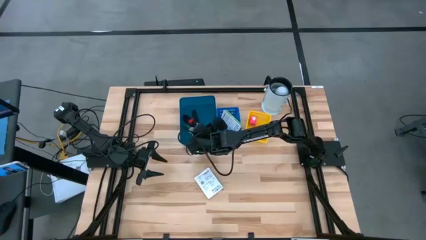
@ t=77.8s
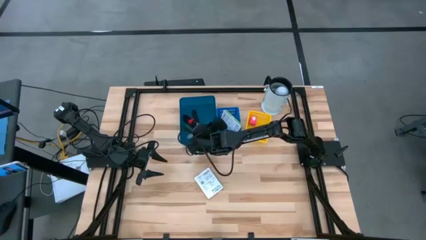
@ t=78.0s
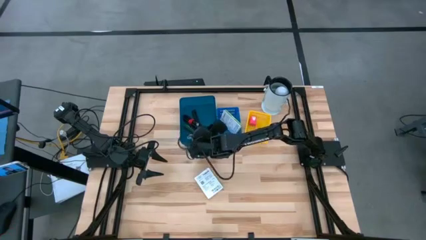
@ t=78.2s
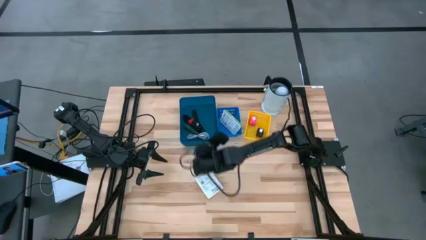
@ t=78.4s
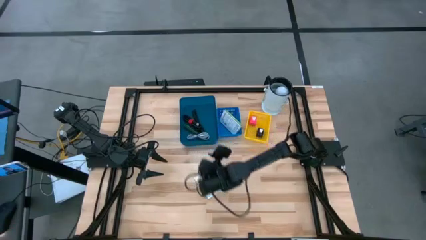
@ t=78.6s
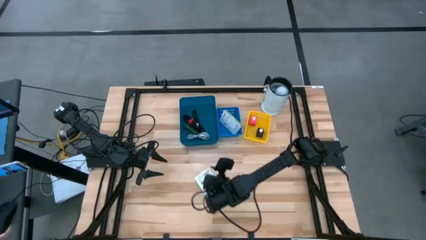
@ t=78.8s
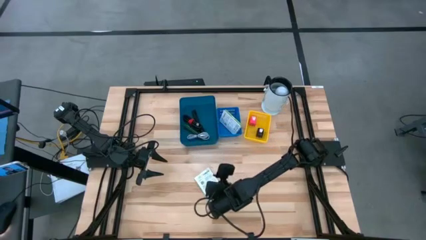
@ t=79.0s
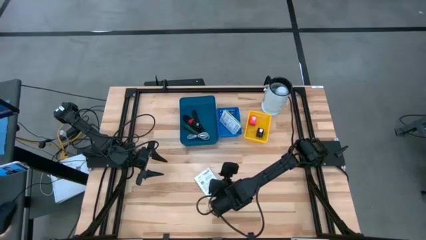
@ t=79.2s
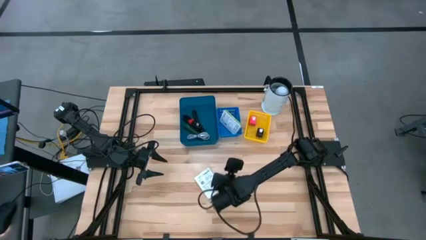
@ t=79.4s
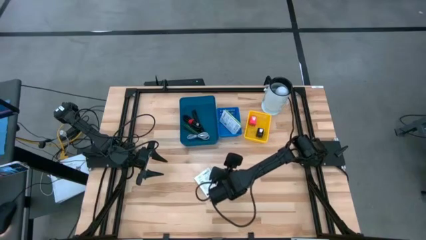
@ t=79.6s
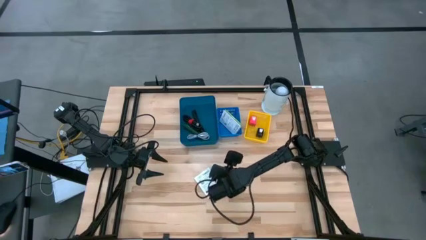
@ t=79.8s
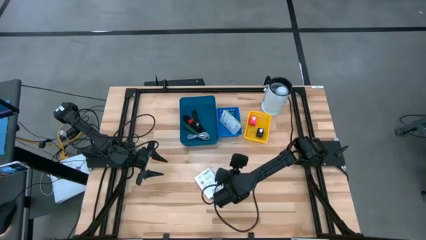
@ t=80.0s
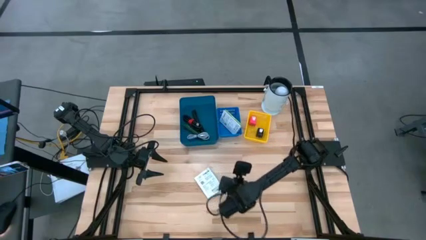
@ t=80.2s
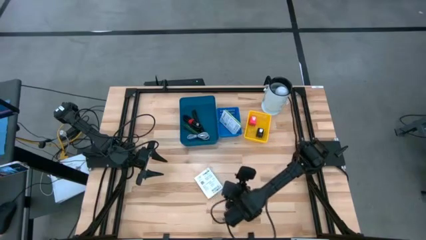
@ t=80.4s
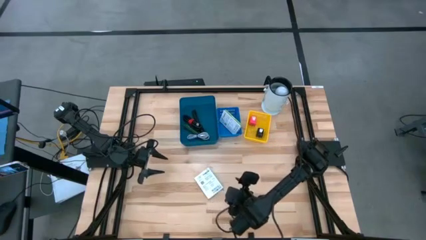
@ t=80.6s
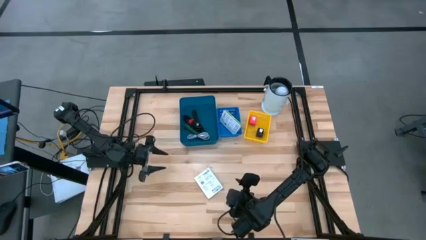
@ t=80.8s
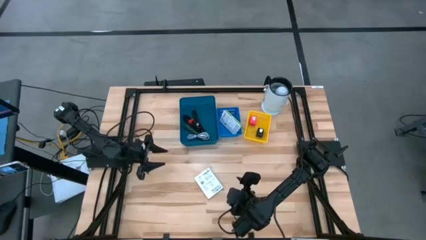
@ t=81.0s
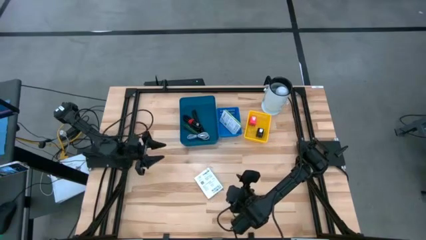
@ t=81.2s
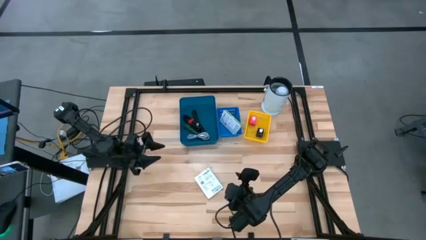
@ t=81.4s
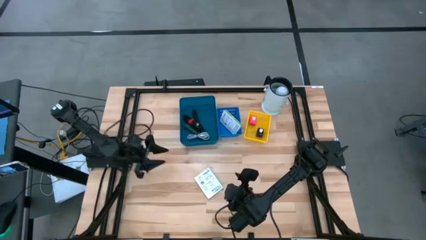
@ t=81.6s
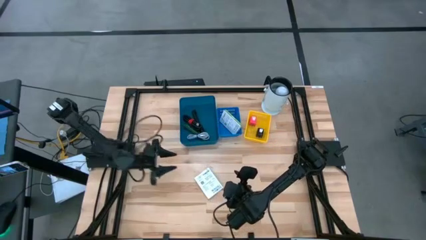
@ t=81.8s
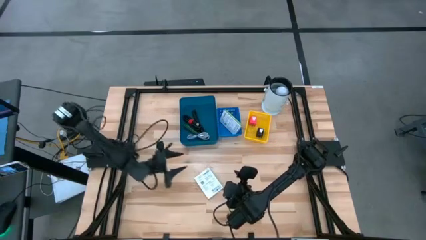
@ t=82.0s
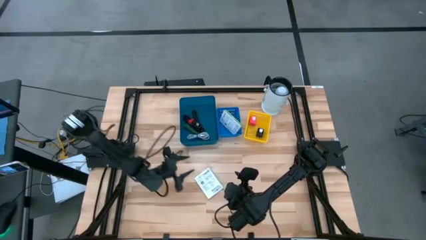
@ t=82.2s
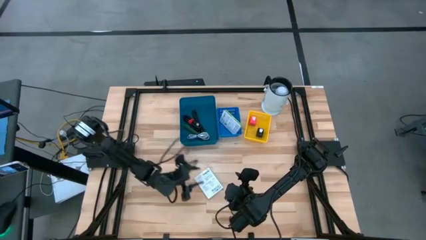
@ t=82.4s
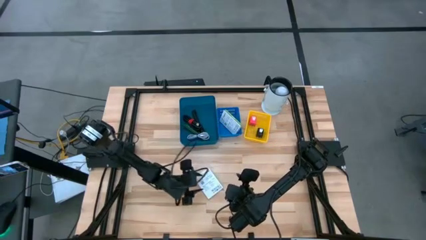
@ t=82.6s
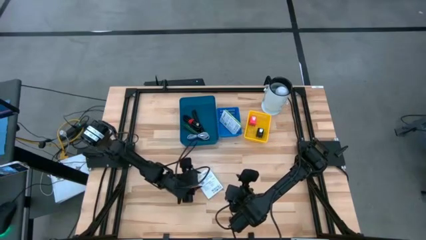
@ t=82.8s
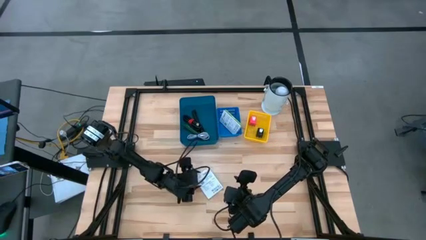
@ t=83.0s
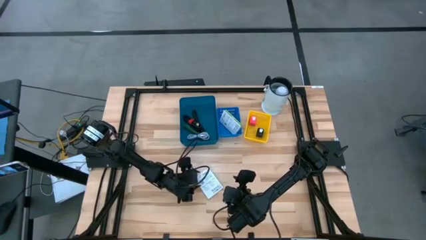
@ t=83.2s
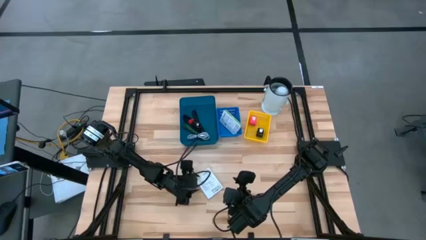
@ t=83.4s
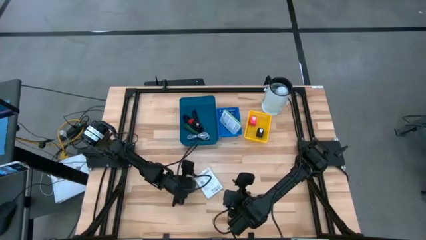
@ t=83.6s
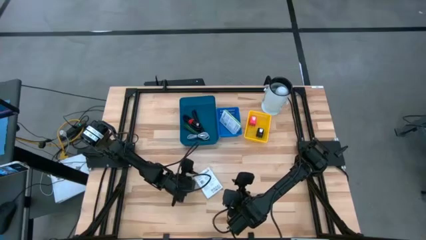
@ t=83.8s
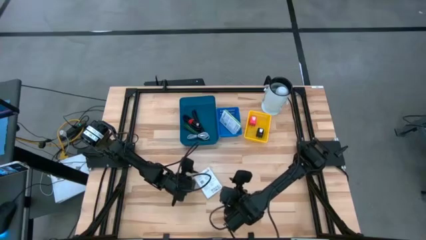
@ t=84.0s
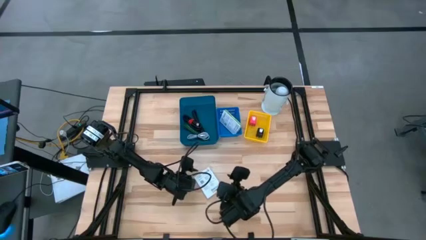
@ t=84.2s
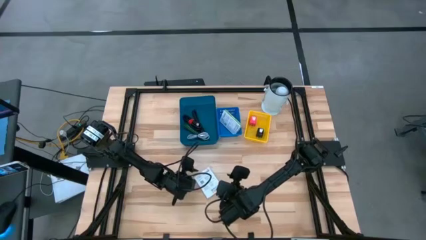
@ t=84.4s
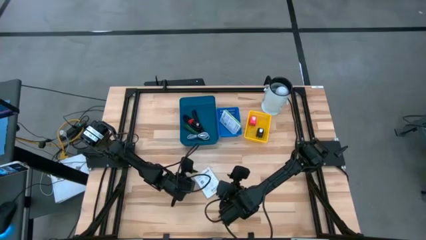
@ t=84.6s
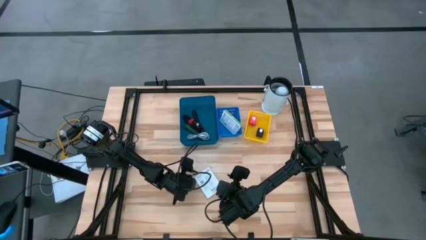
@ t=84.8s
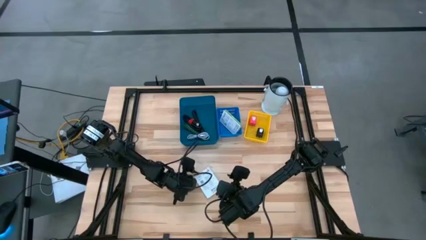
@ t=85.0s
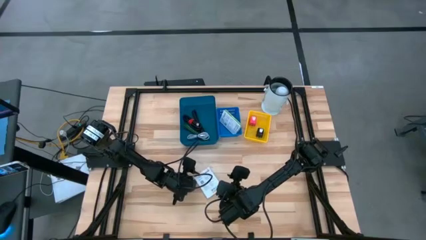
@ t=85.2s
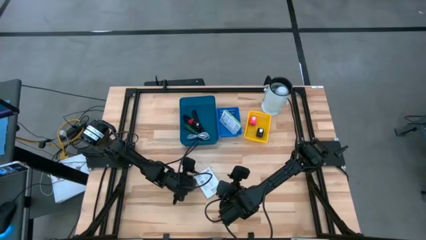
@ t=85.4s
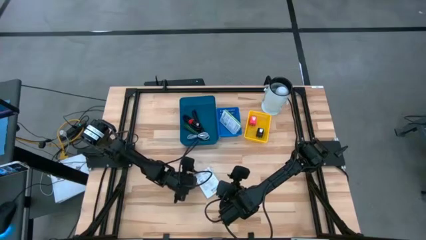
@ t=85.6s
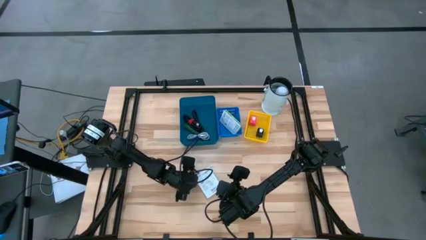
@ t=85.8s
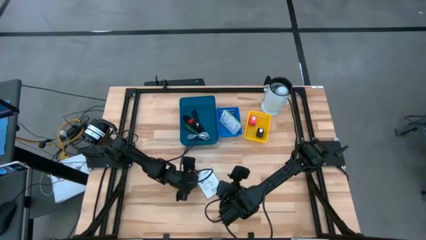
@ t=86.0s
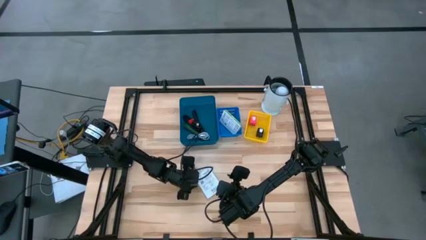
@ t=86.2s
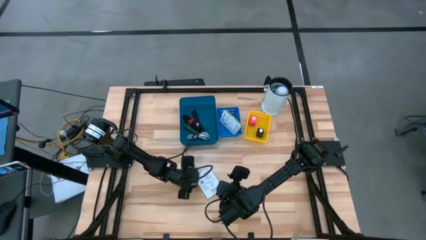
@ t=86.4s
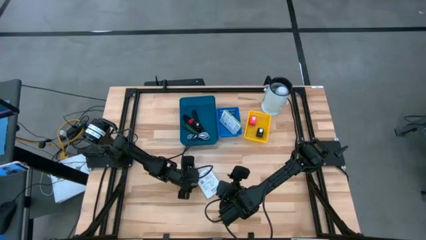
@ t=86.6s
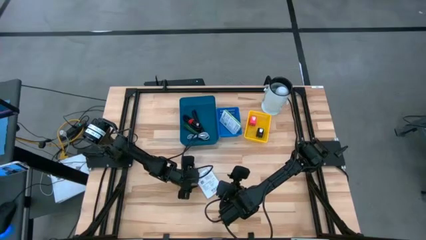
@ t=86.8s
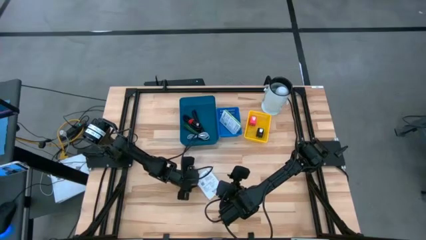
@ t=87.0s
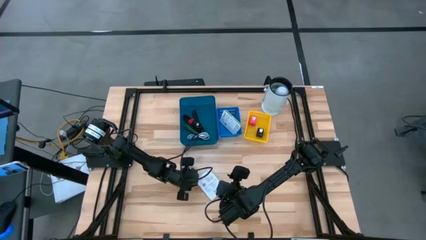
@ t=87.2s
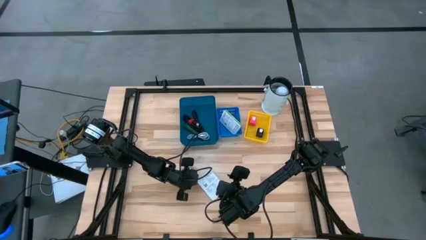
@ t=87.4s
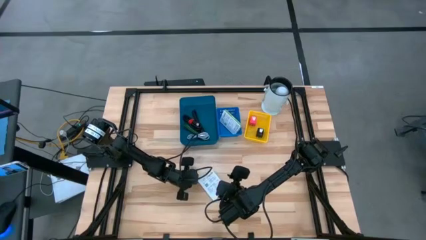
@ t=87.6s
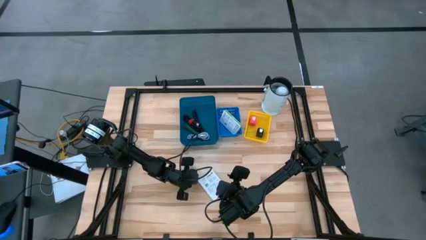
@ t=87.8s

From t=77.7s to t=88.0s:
Task: Pick and place items into bin
Put the white card reader box into the blue bin

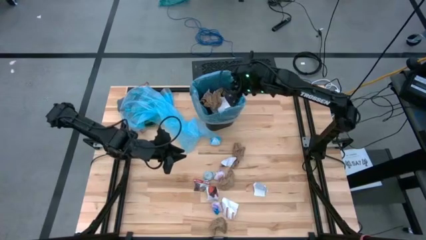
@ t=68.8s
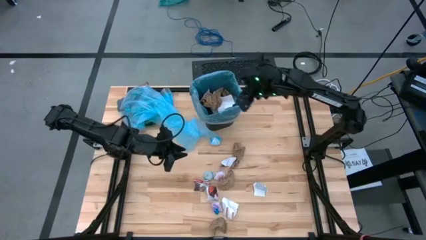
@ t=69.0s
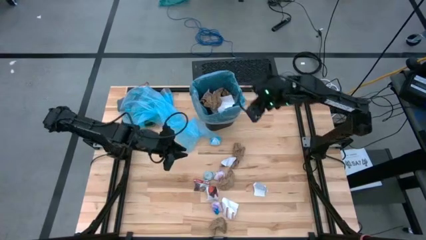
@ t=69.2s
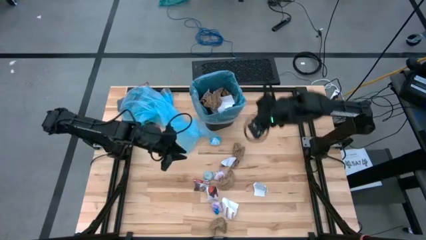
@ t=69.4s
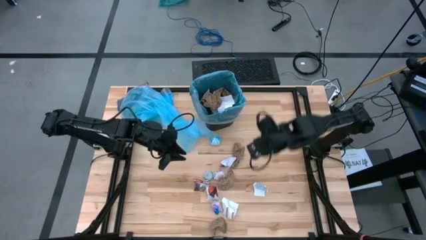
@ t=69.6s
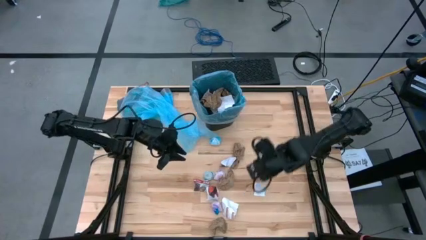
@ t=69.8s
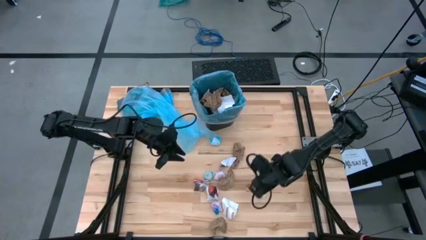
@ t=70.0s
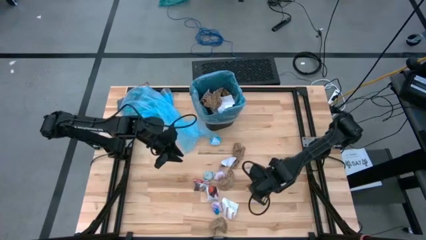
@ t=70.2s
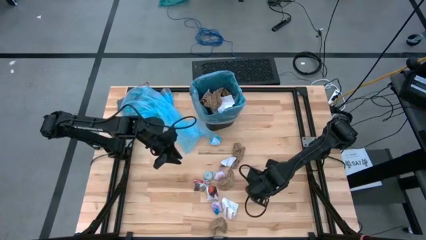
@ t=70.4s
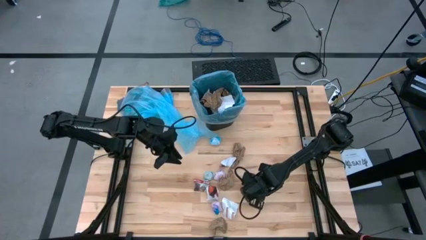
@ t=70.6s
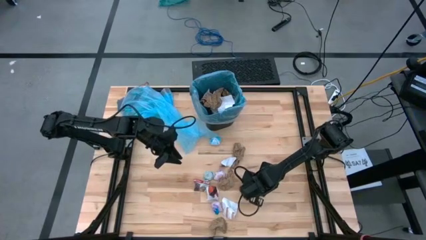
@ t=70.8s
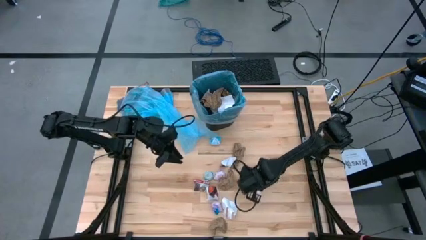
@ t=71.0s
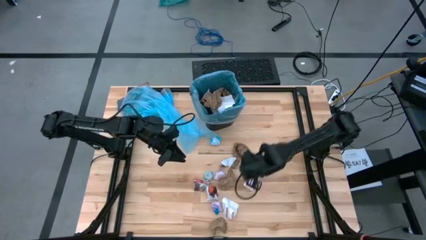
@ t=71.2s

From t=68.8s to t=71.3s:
Task: place trash/remove bag and relplace
Put the white paper into the trash bin

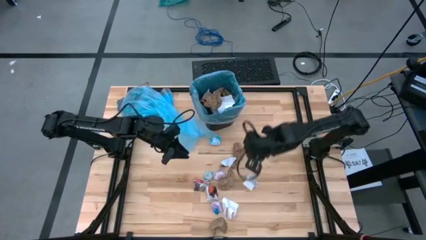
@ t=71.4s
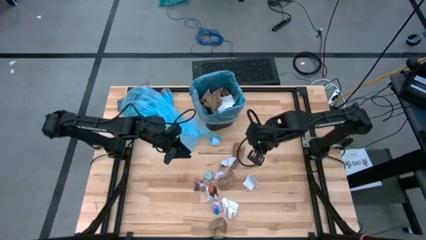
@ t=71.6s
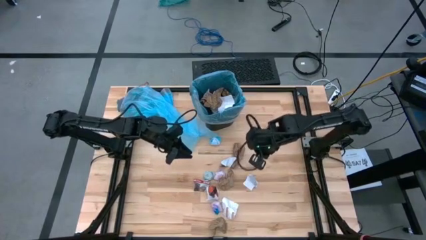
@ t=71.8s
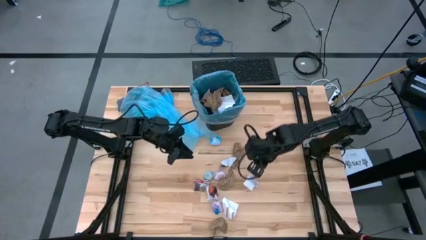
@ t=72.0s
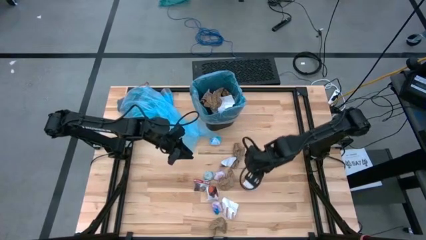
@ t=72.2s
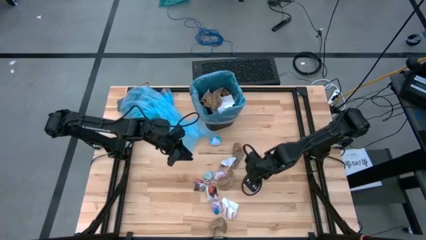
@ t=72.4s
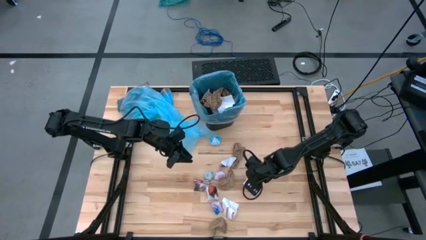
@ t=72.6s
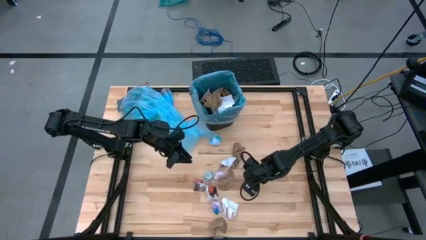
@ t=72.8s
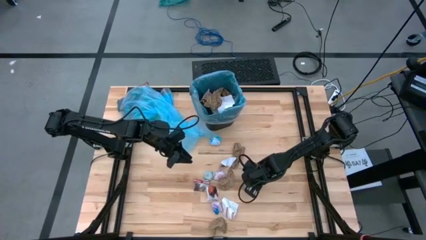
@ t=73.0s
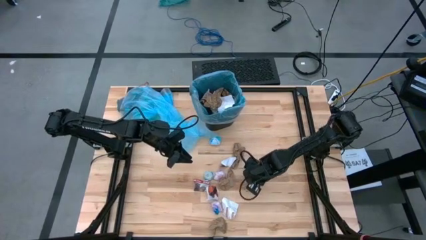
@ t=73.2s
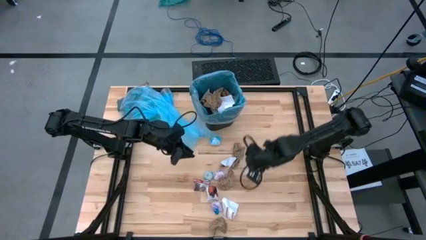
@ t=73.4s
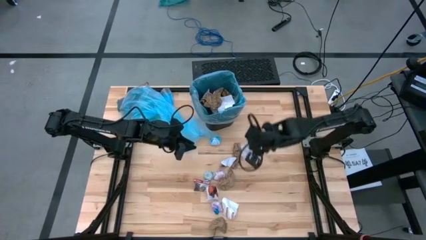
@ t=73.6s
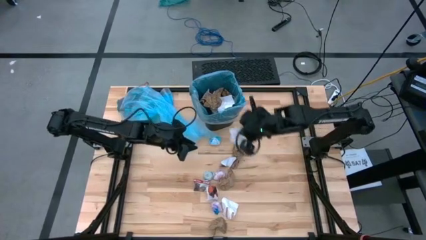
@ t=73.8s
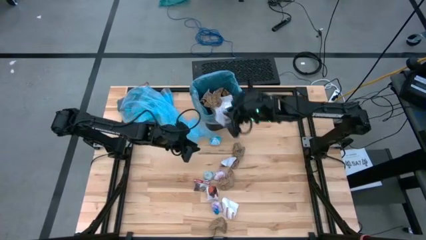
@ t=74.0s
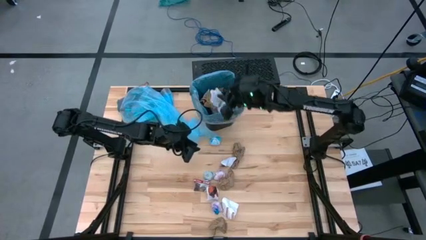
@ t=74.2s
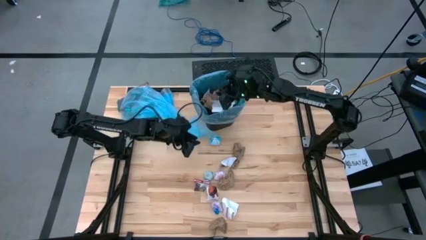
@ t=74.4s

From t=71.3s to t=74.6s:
Put the white paper into the trash bin
